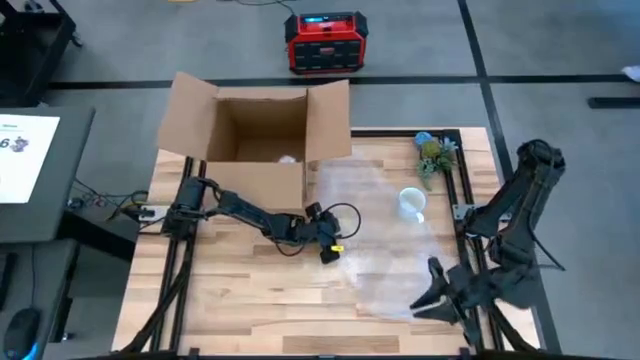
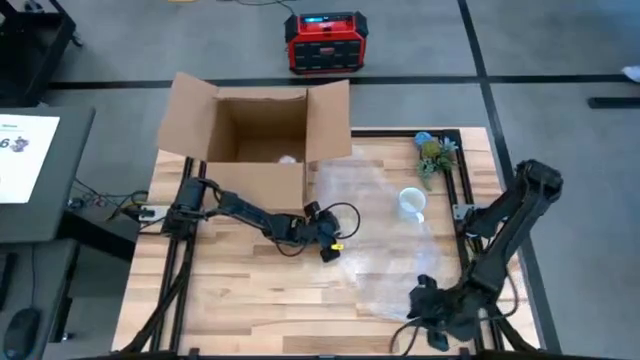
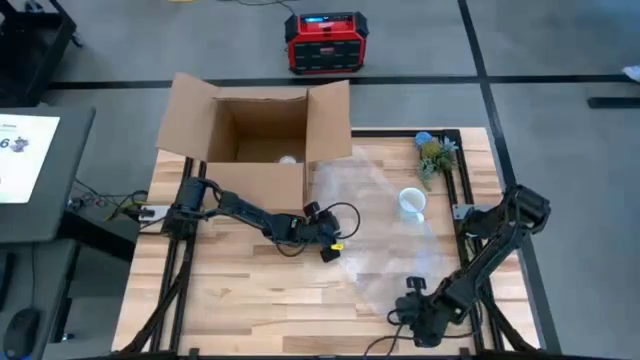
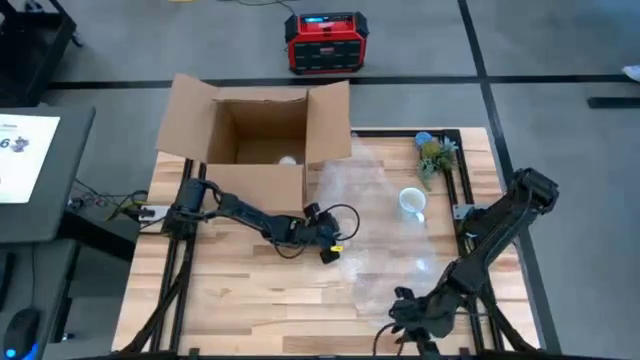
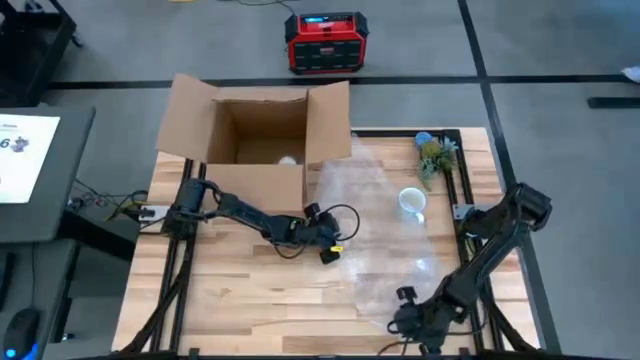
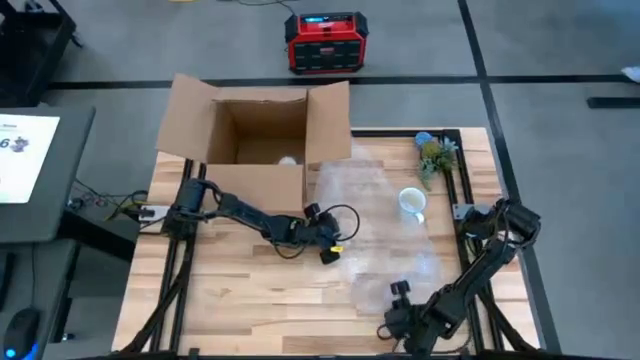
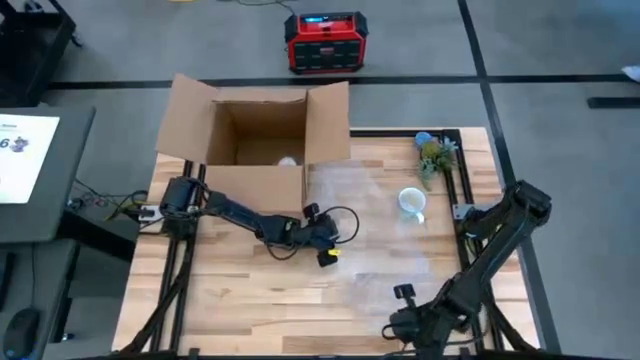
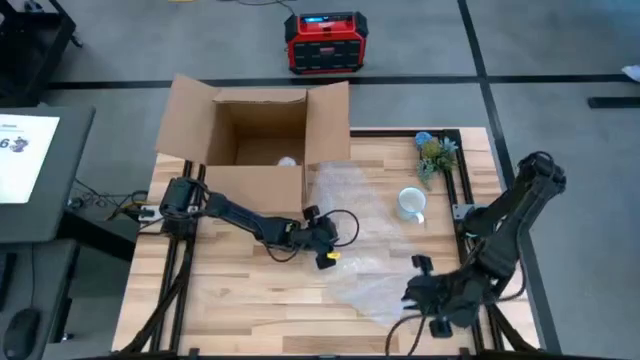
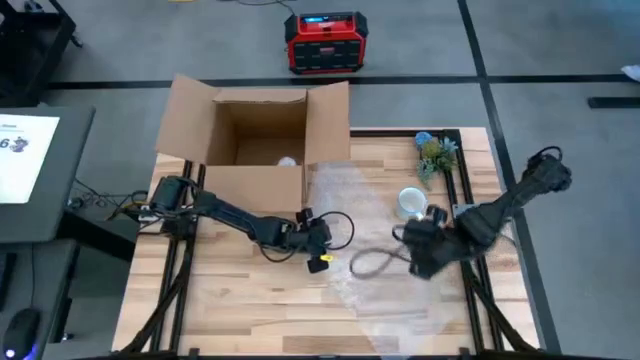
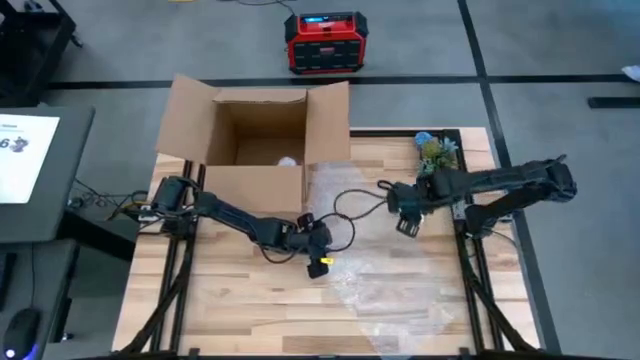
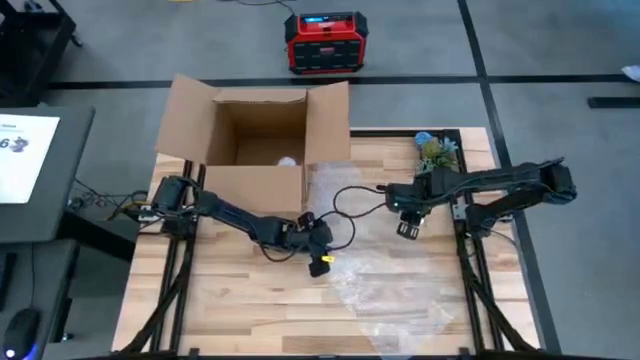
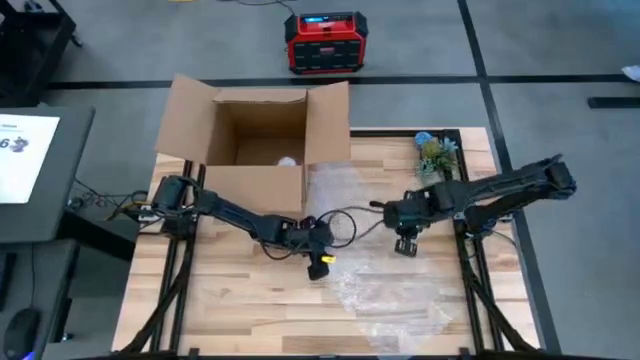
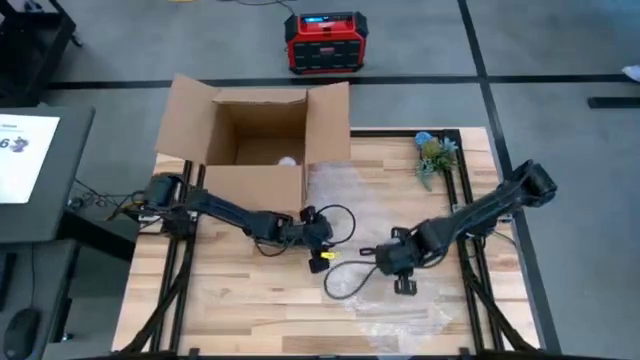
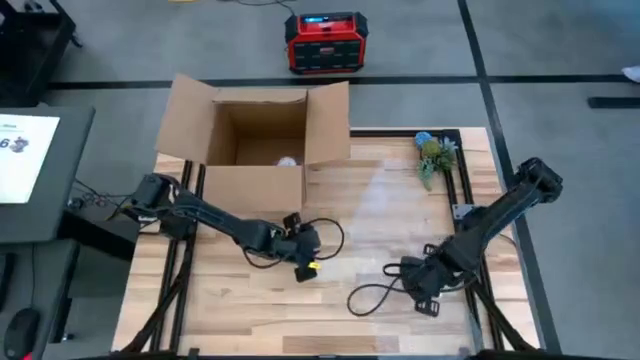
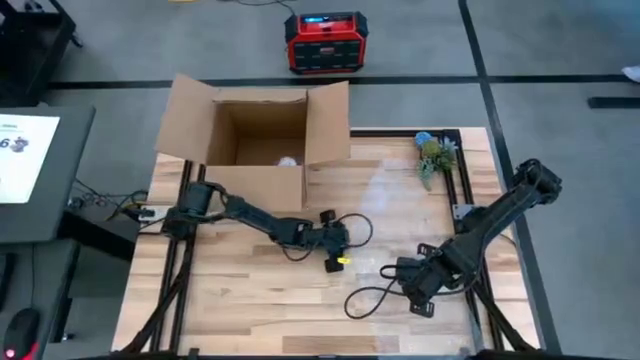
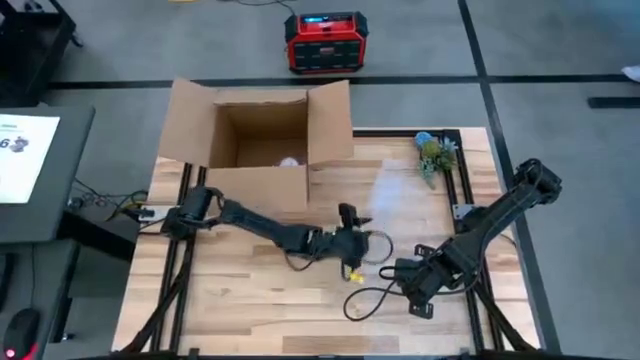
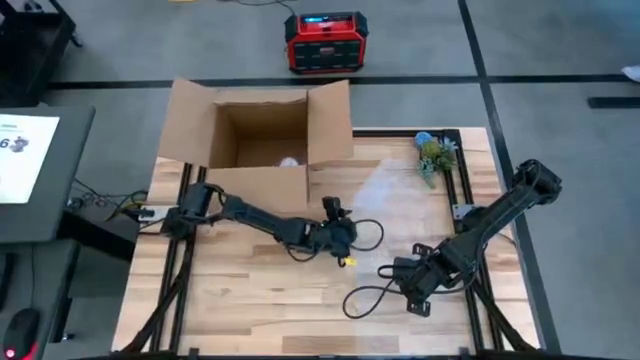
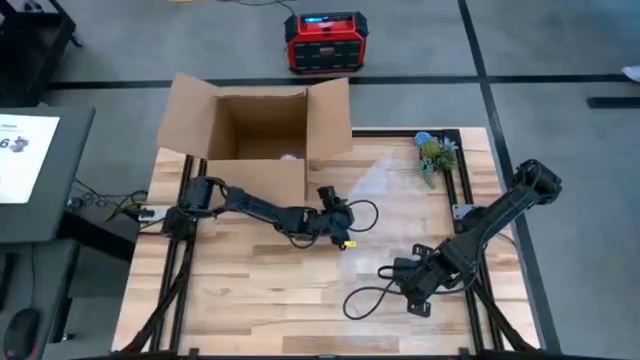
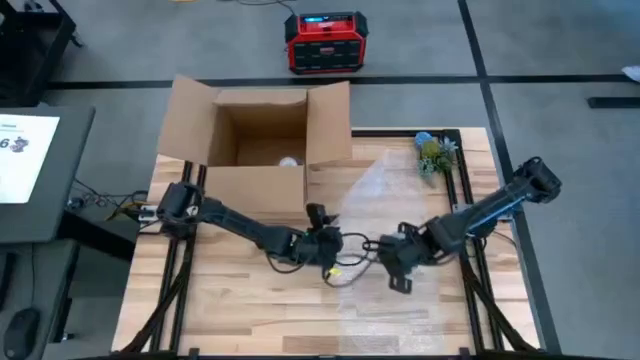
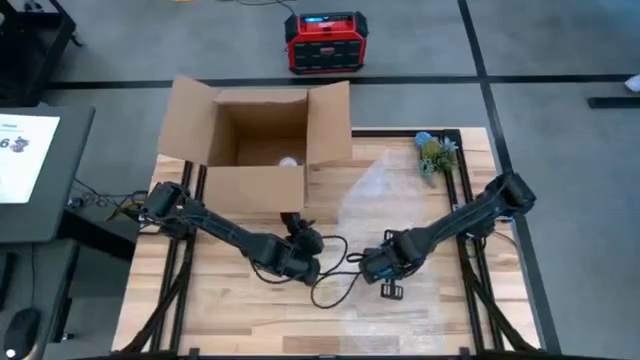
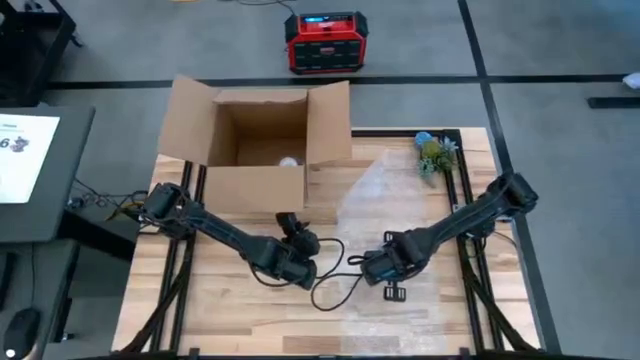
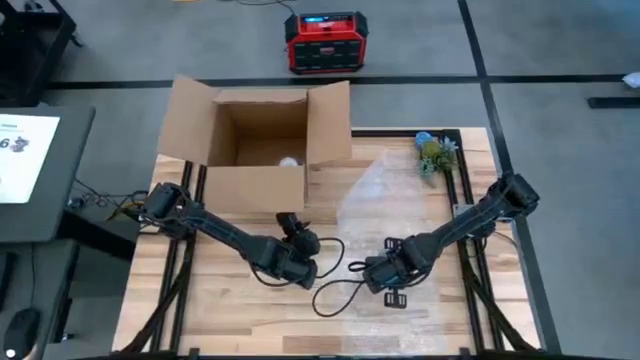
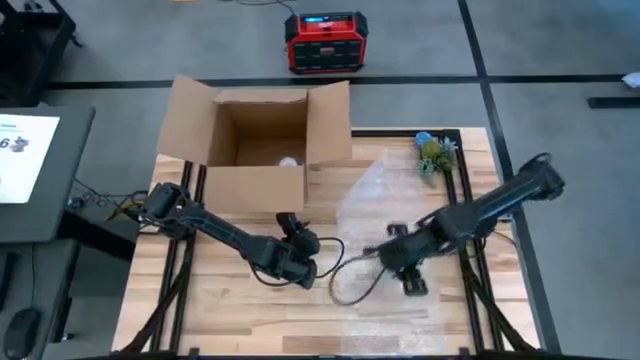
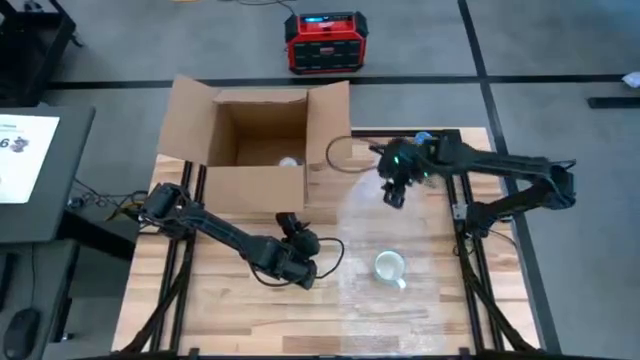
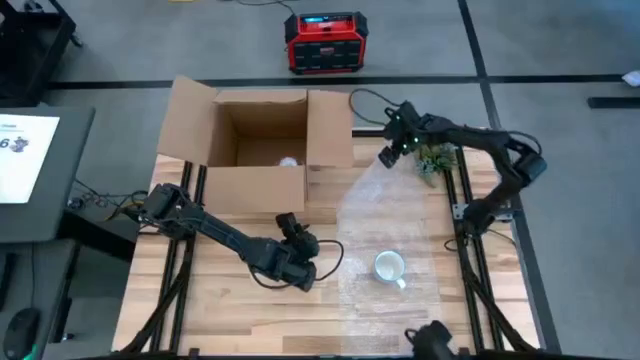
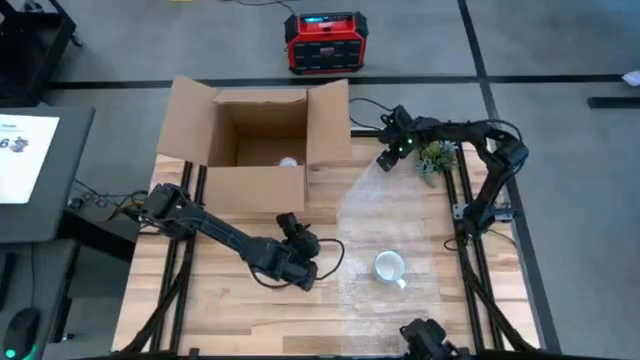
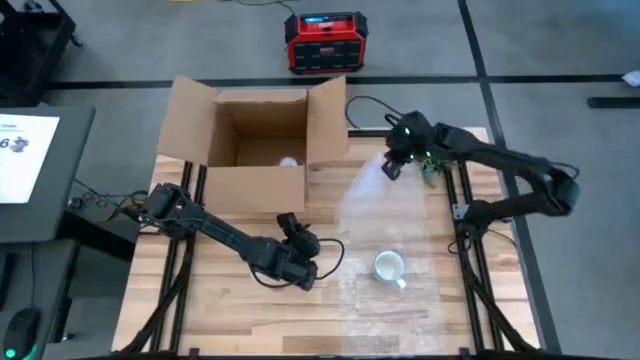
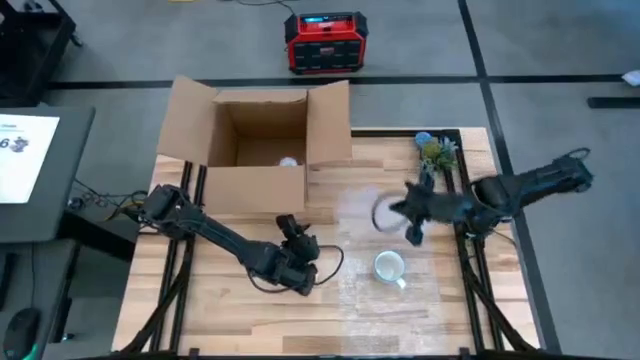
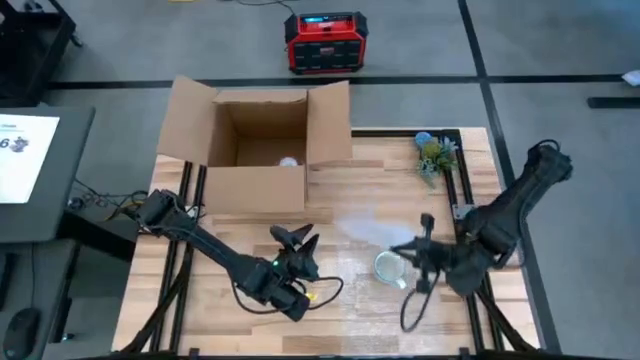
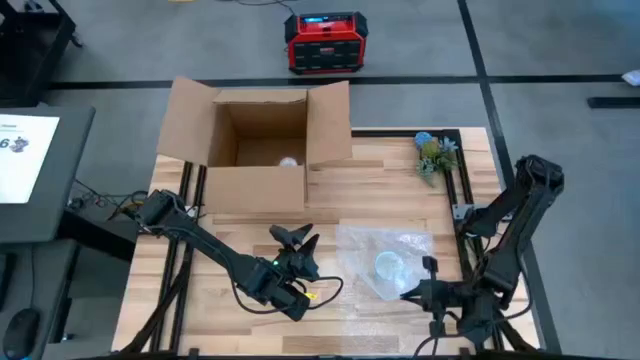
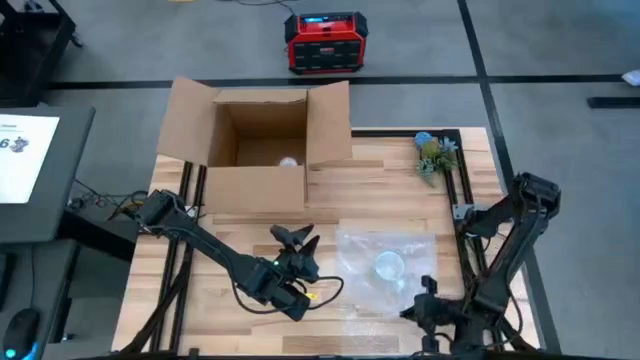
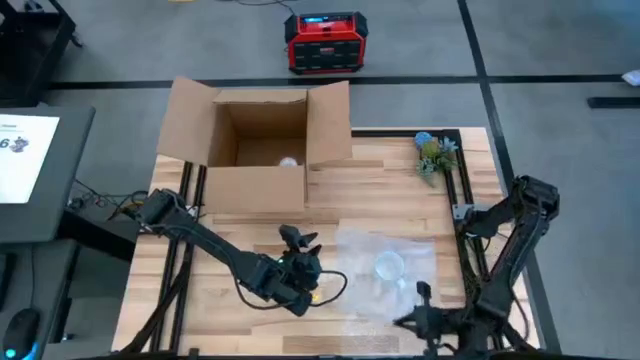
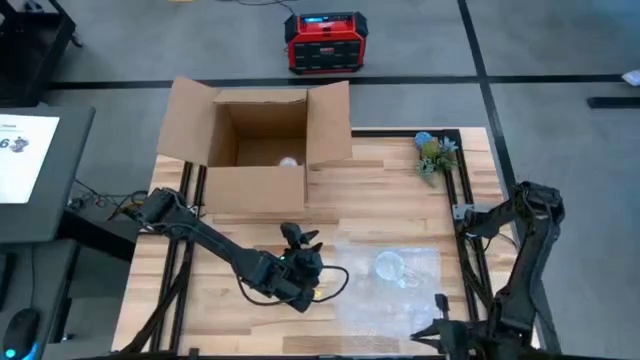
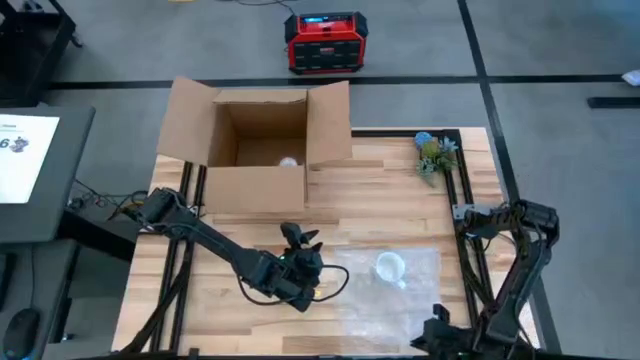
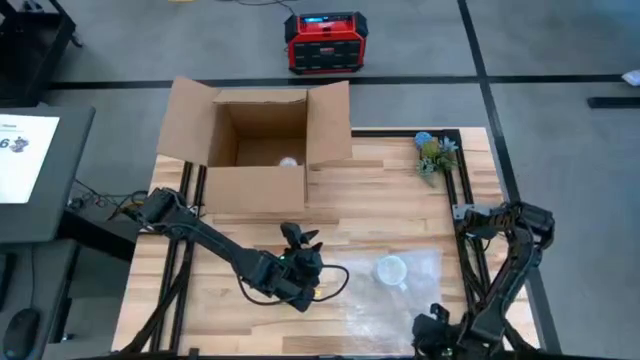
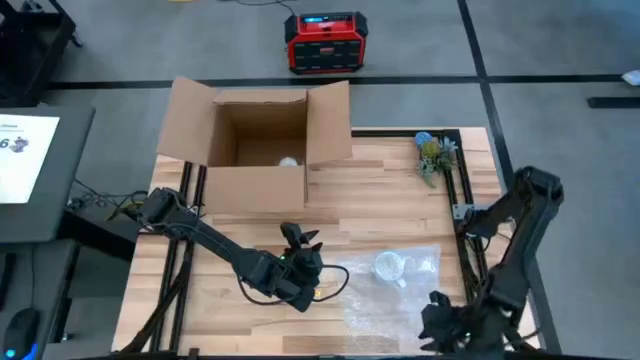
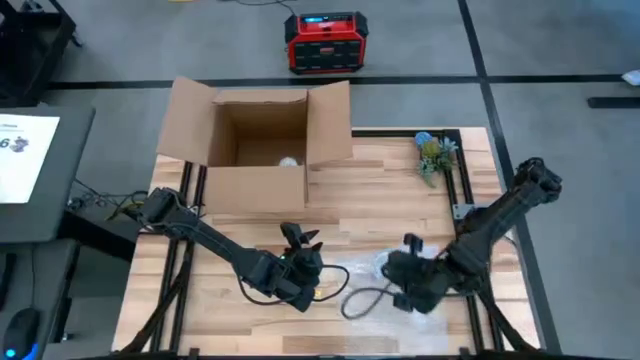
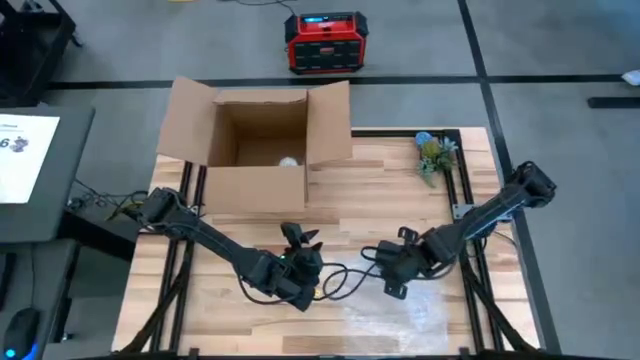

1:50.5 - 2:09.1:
Task: wrap mug
Wrap the green mug with bubble wrap

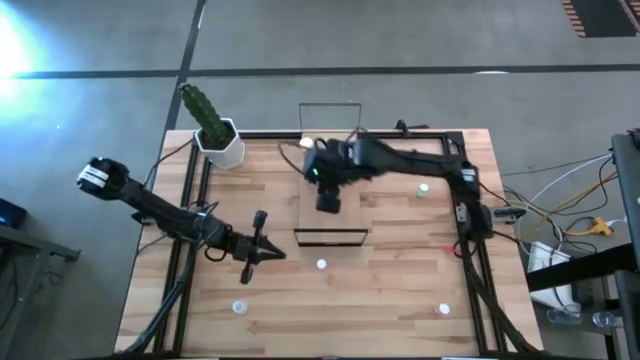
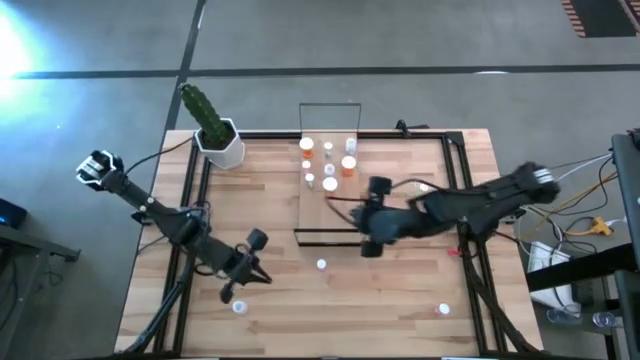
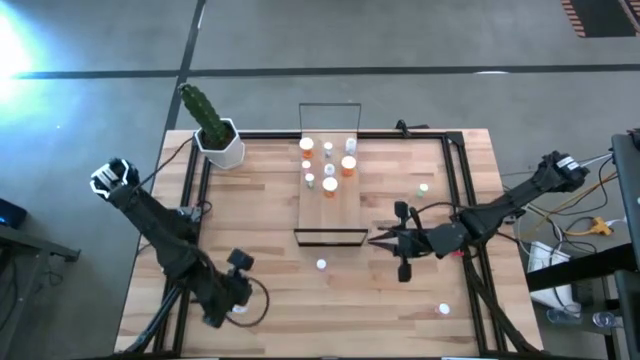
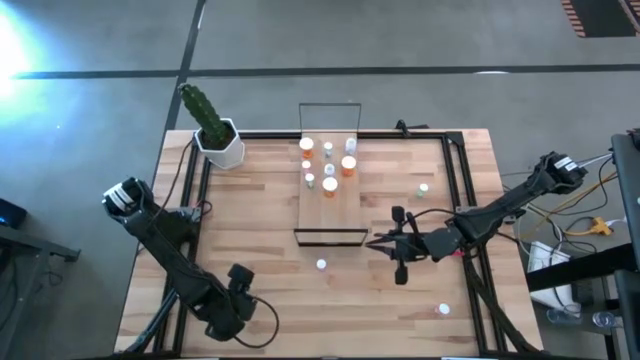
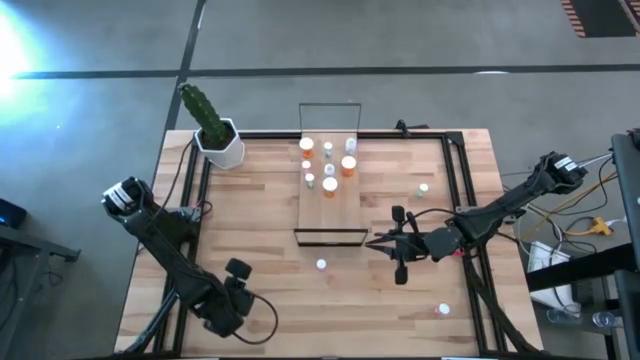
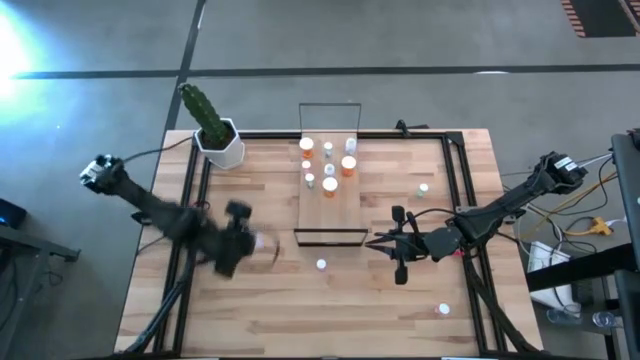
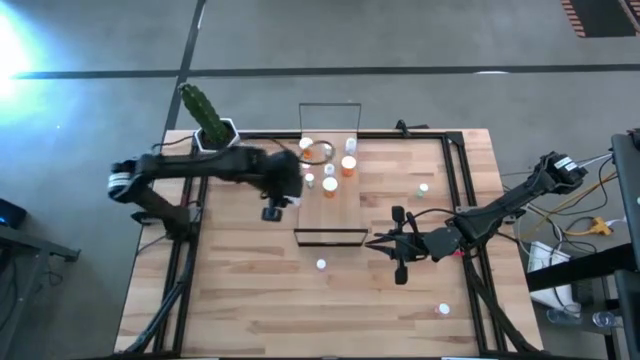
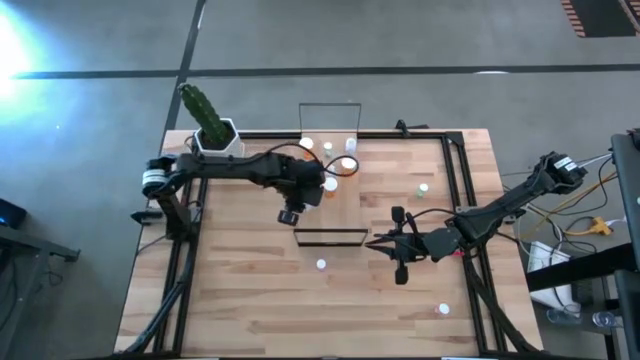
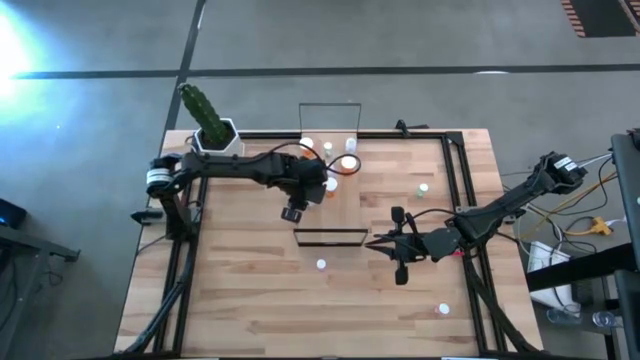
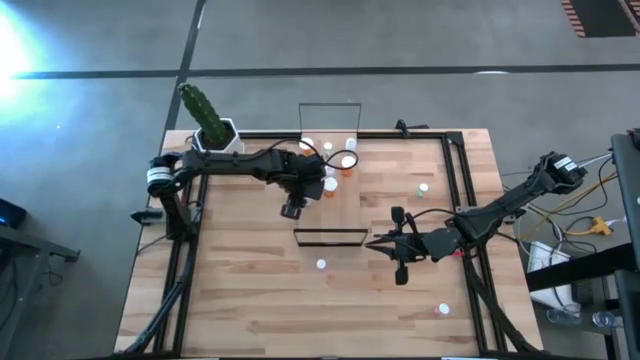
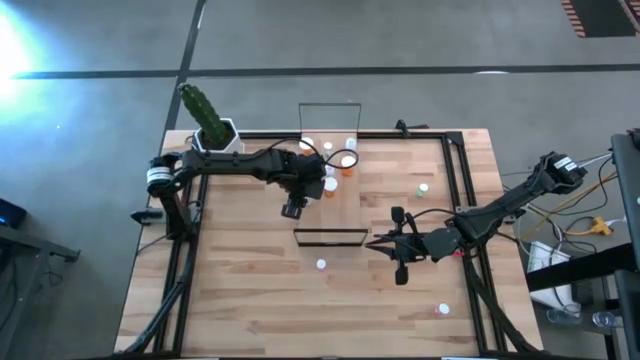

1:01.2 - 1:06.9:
Task: Pick and place medicine bottles onto shelf by color
Put the transparent pill bottle on the shelf
